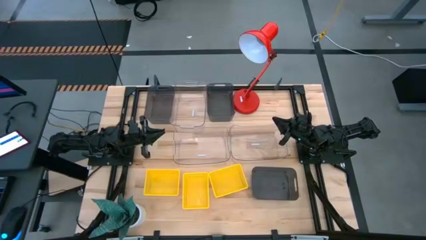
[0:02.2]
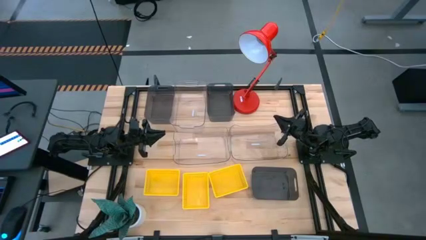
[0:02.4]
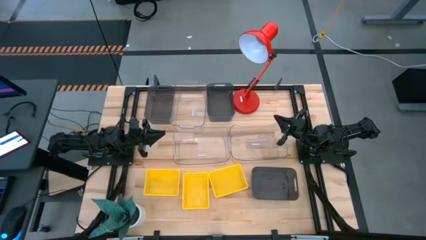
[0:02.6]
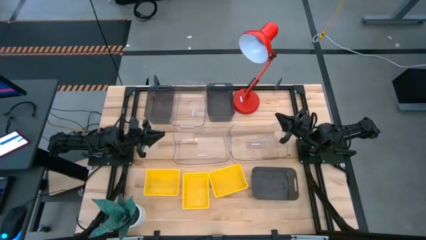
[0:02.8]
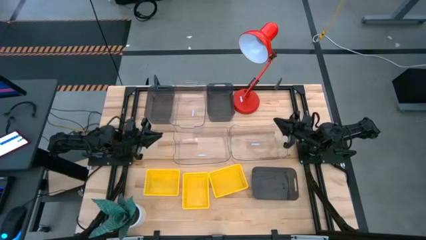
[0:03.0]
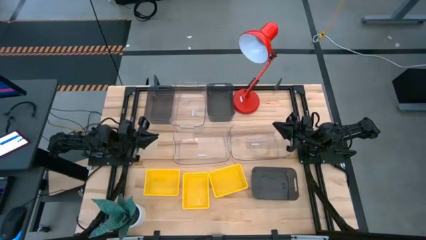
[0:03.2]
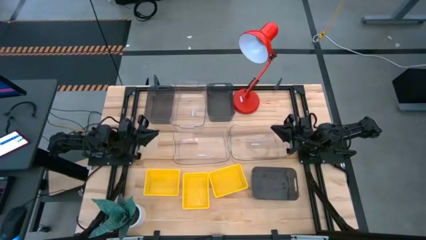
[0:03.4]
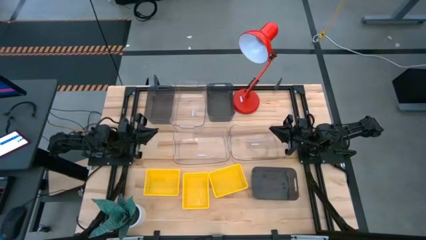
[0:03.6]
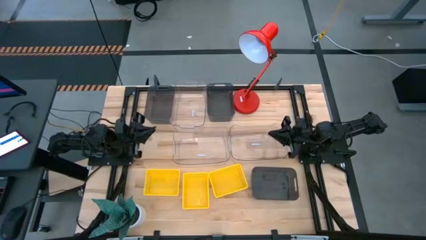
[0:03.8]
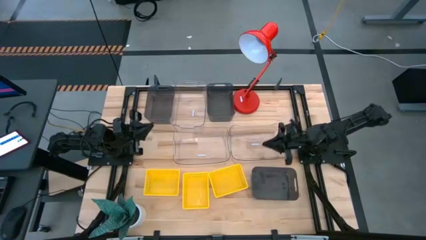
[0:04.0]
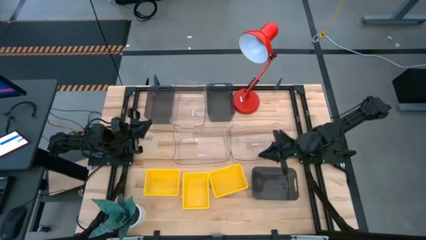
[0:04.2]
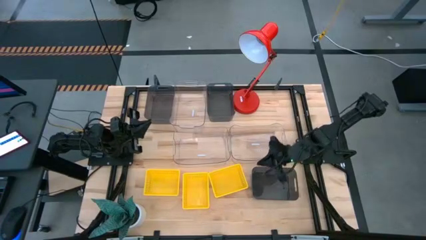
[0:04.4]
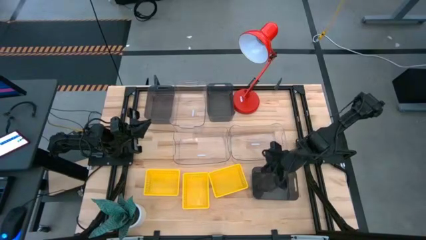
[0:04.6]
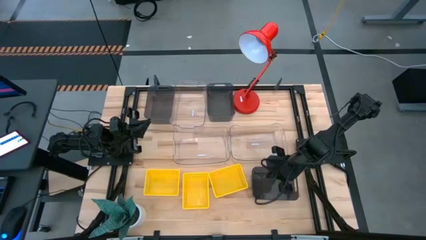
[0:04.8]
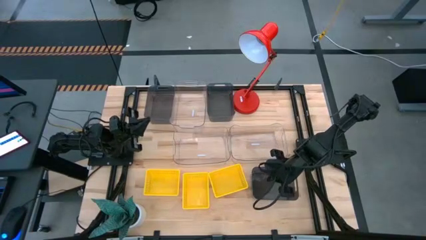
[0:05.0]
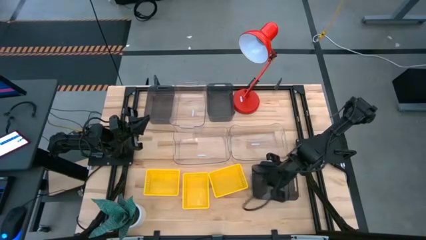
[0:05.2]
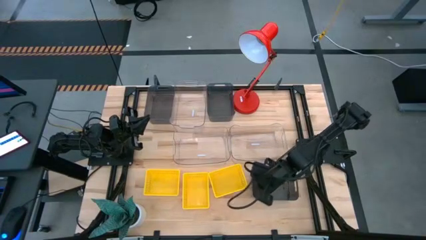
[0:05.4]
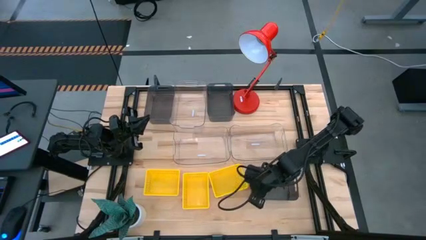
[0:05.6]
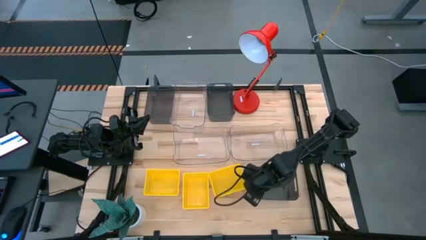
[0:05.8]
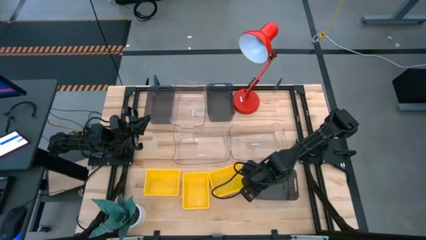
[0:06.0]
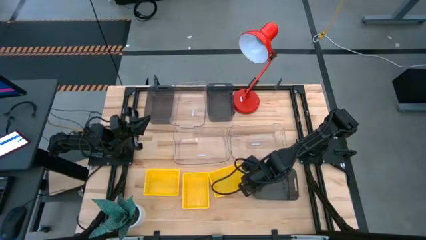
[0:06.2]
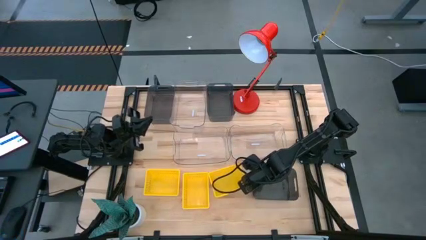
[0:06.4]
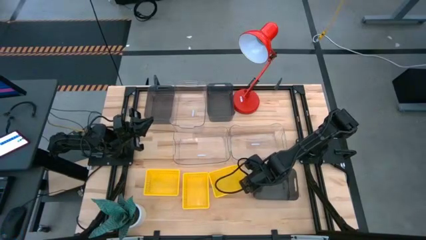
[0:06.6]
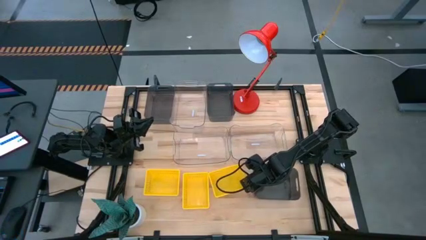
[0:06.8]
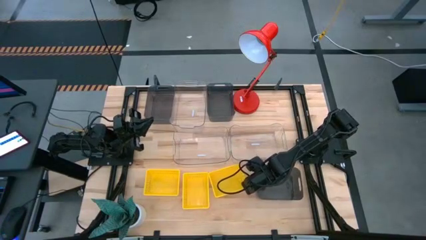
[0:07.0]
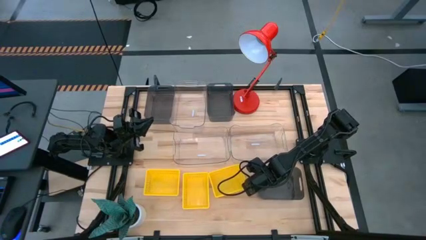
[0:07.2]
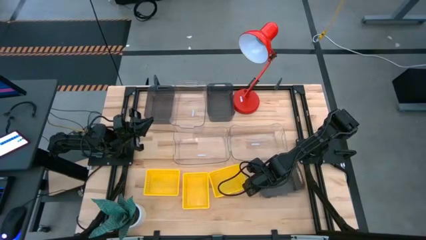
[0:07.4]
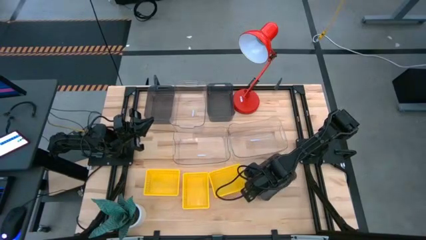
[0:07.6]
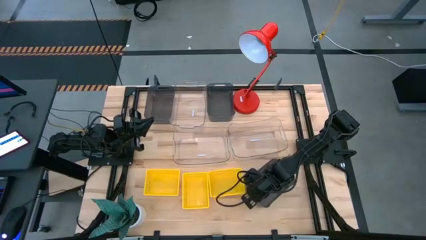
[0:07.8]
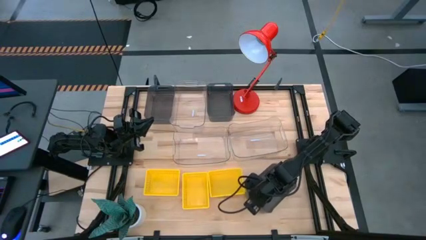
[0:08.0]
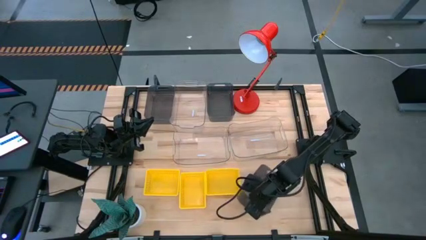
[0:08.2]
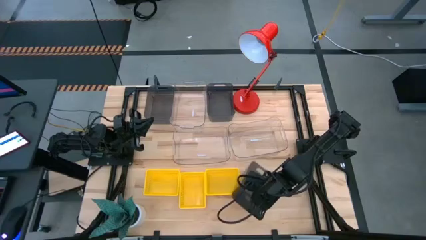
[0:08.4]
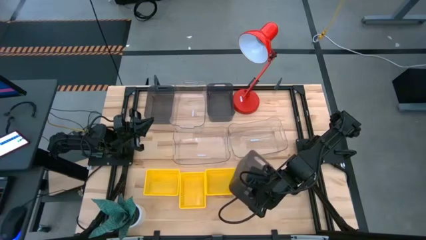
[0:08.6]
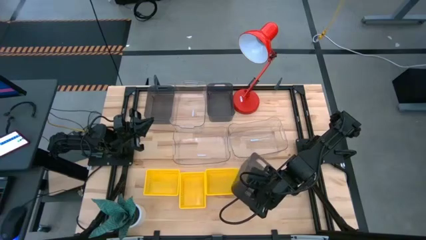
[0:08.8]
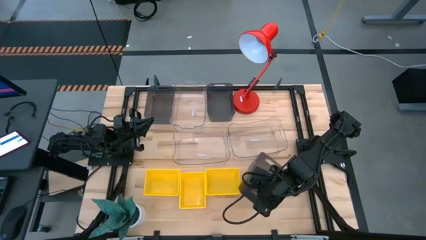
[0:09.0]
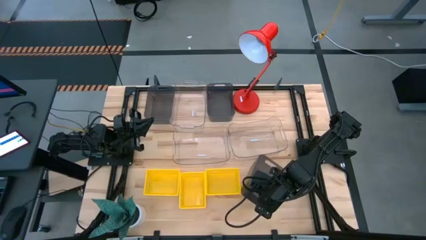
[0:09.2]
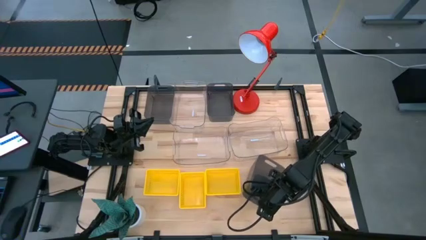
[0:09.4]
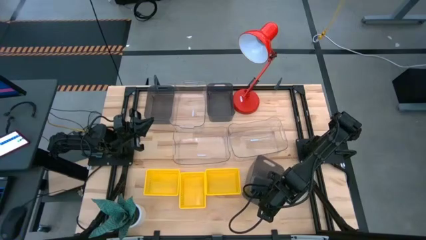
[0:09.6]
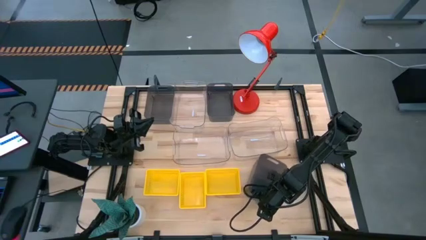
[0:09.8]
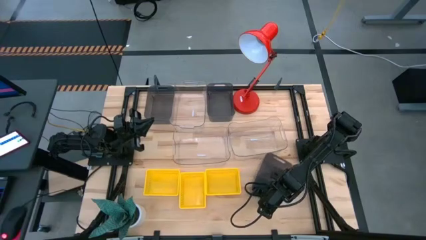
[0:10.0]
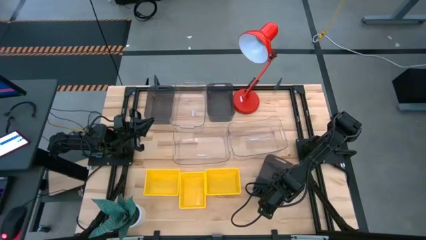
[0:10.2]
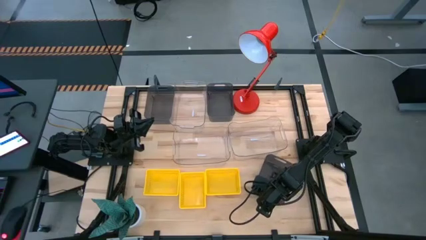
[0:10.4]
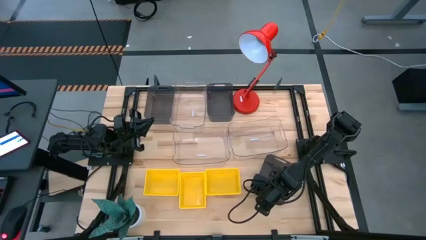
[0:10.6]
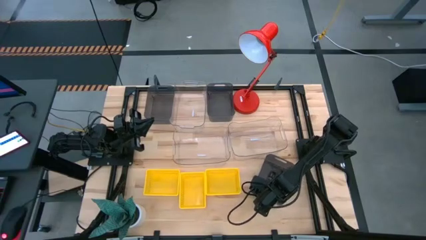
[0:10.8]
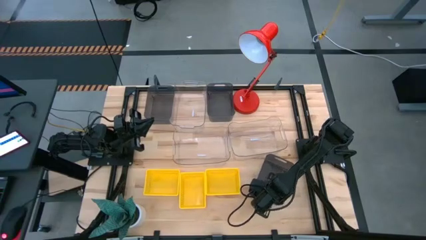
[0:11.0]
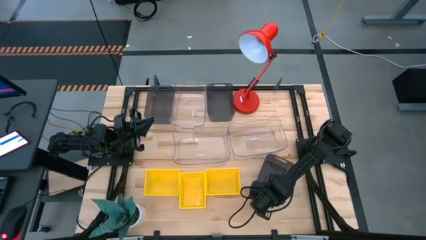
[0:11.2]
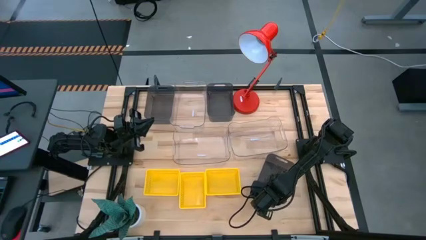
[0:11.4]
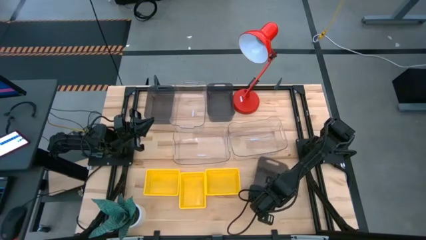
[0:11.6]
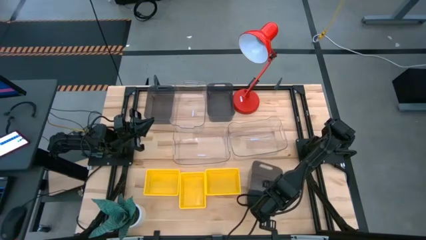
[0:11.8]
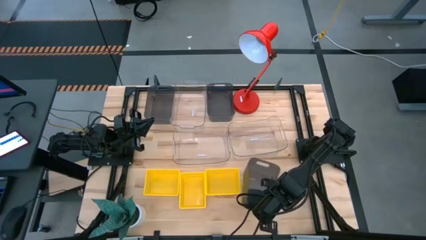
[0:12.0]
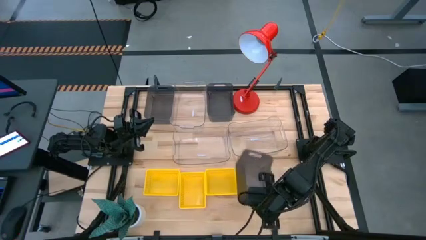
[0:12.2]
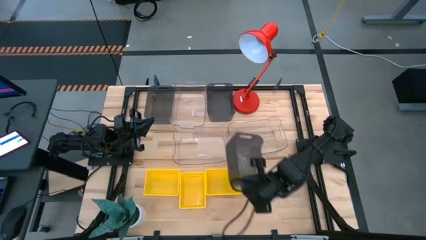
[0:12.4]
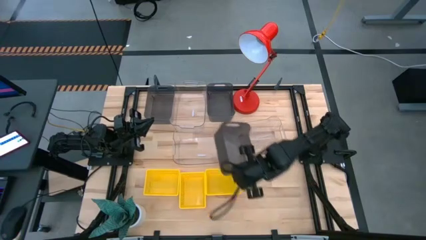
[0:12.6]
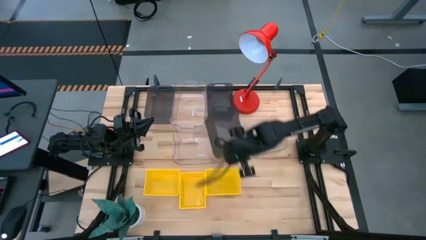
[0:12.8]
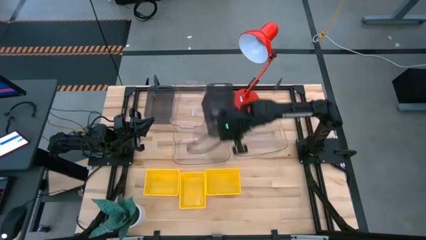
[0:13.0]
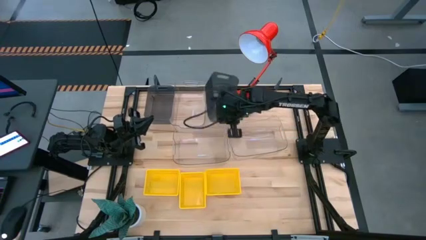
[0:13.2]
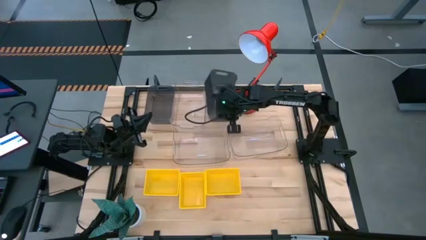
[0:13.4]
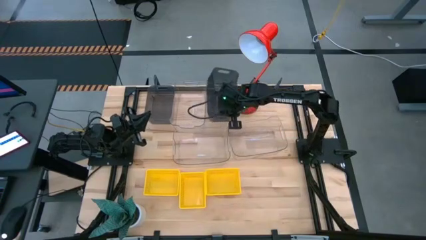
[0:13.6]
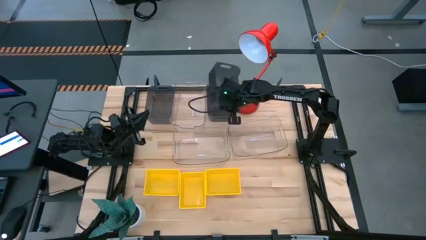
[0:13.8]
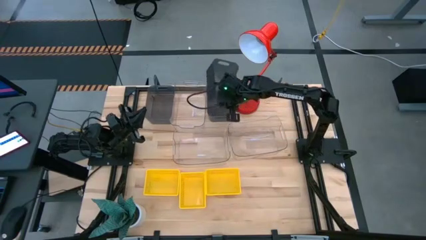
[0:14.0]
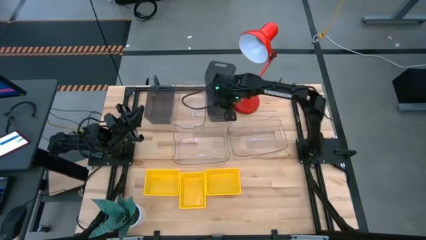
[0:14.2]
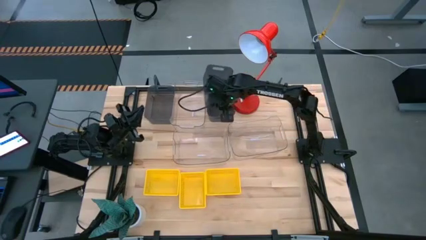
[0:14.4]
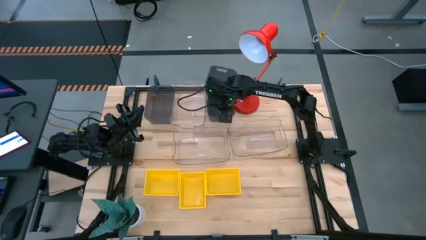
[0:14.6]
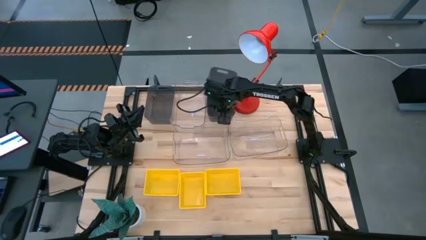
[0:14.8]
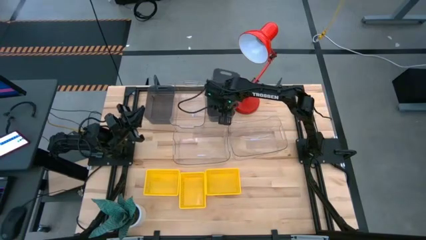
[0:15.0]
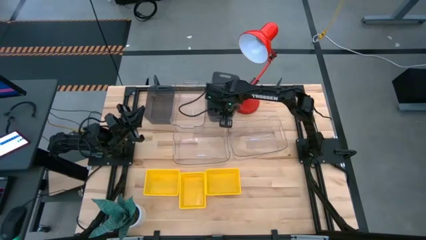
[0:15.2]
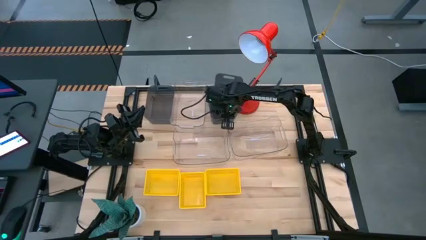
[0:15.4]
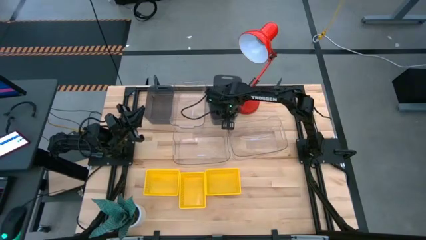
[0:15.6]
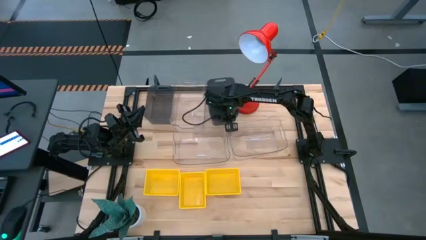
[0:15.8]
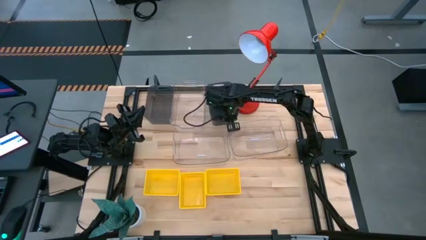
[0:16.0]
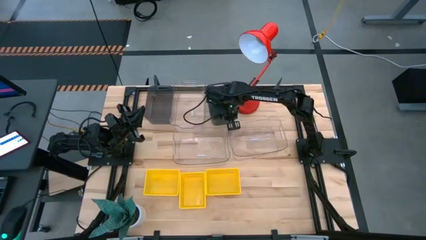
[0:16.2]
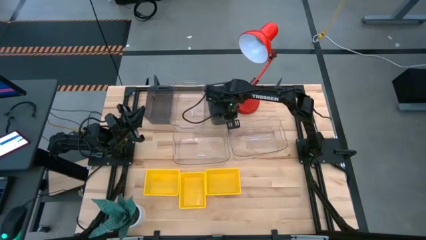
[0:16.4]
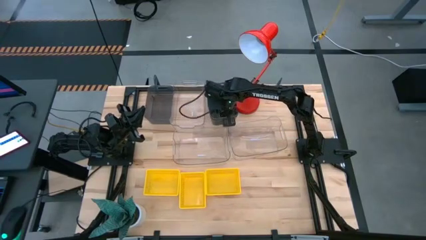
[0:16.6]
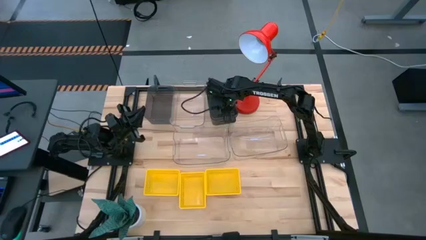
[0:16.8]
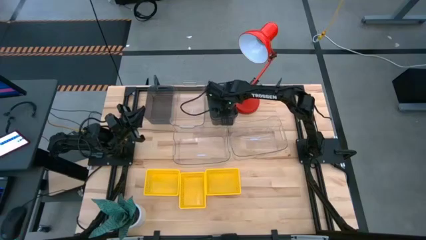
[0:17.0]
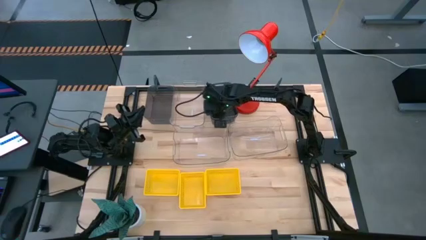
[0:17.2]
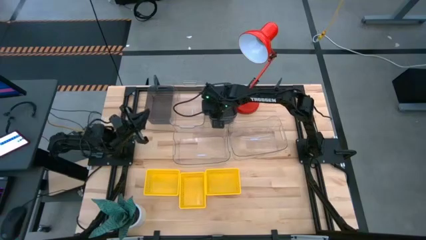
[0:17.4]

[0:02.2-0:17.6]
Stack the bottom black bin on the top right black bin
